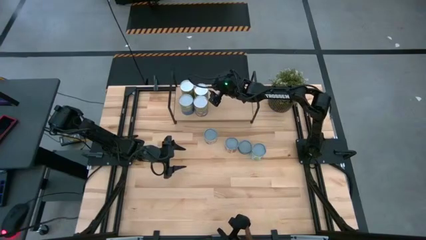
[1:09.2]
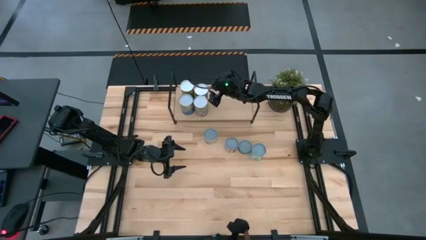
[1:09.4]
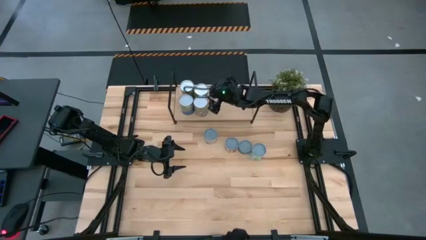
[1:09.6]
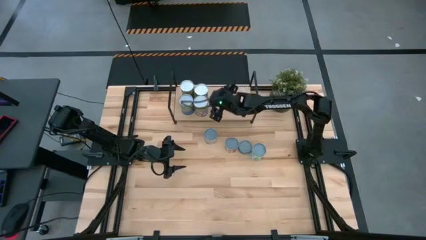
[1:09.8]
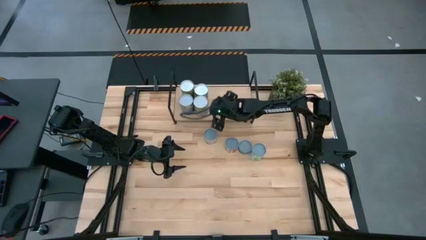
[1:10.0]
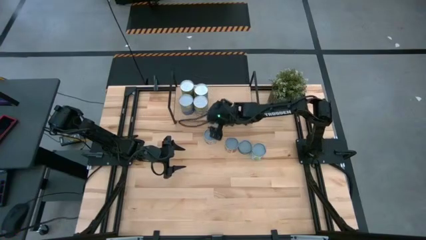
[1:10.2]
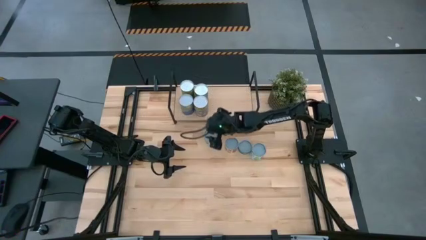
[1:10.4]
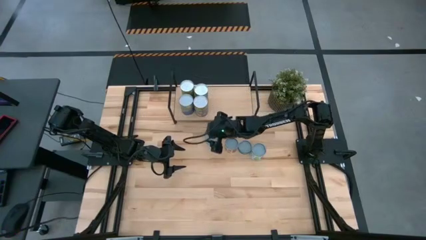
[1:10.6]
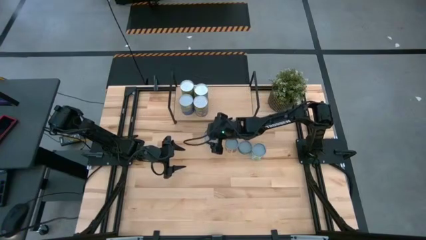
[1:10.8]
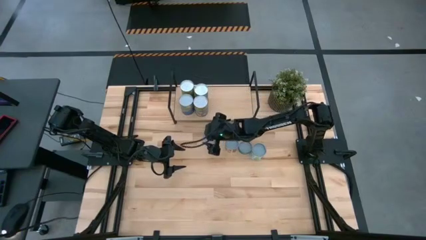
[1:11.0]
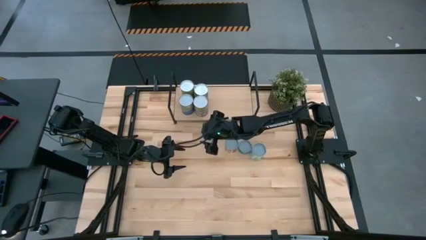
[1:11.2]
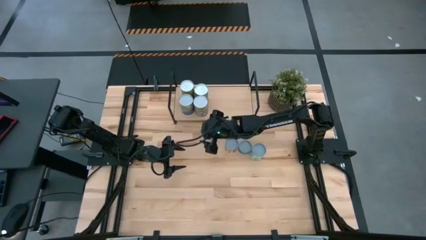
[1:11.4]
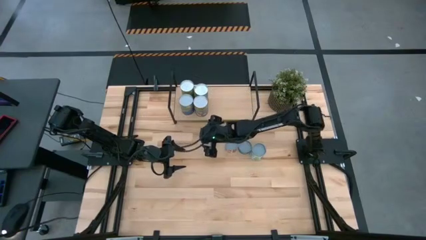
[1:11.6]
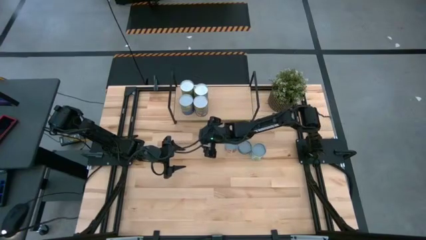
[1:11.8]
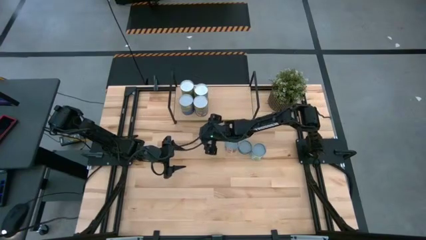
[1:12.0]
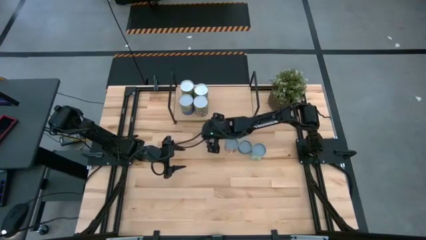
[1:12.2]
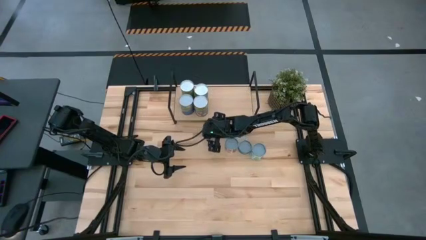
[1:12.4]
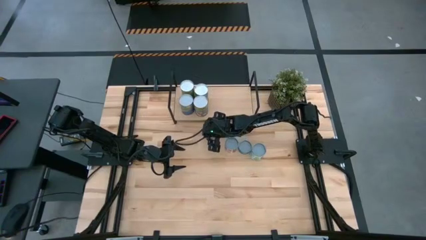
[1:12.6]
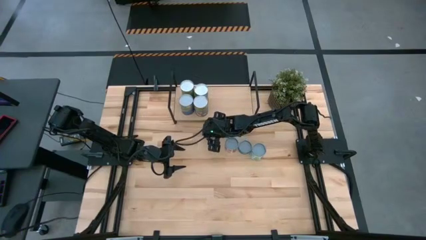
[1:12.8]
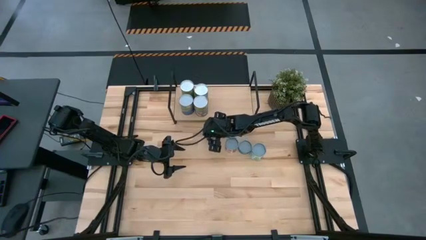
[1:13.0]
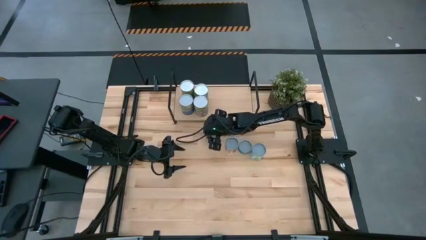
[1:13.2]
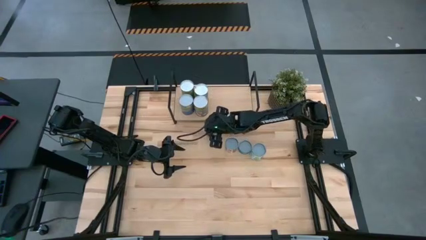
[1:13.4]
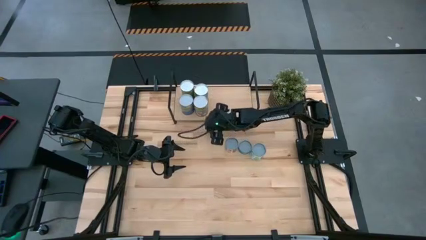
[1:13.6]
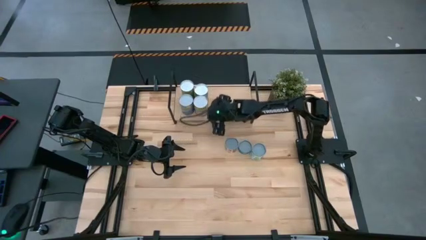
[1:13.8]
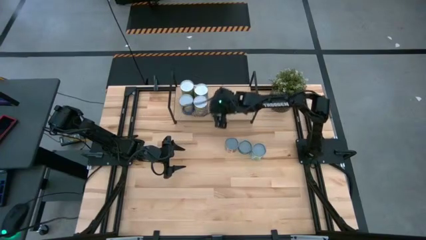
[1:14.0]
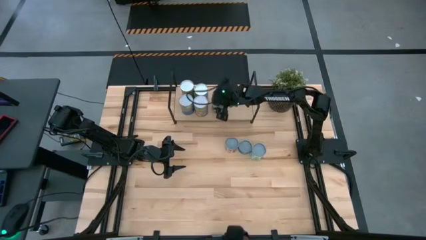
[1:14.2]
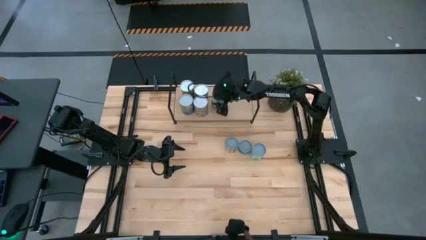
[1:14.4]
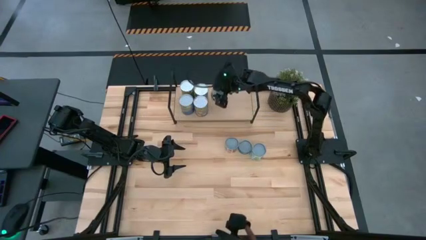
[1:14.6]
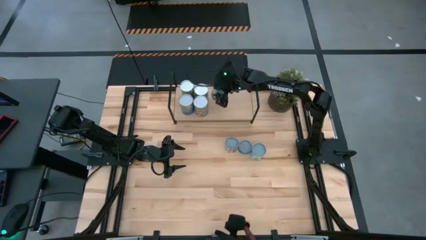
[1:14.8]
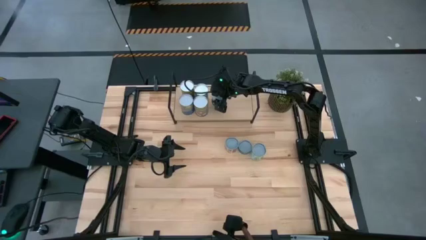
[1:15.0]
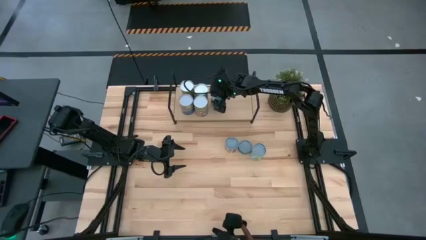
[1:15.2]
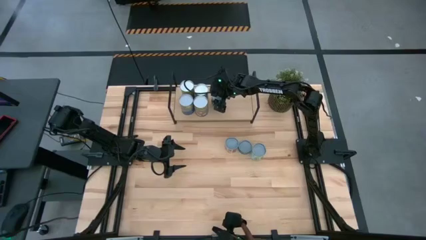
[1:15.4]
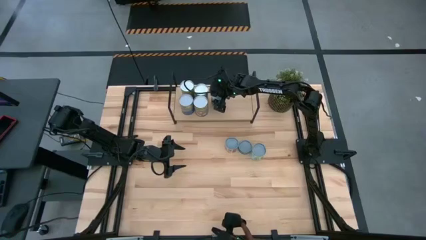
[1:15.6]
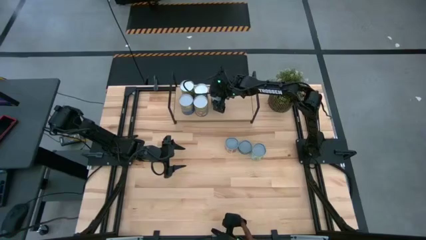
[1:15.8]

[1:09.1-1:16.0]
Task: Pick and place cans onto a shelf
Put the canned green peas on the shelf

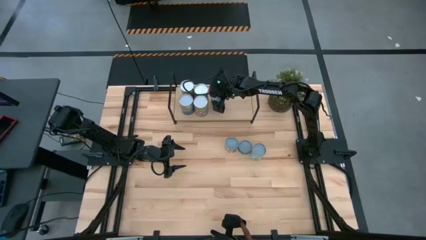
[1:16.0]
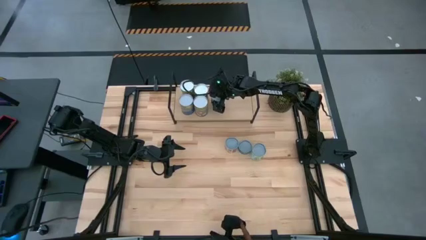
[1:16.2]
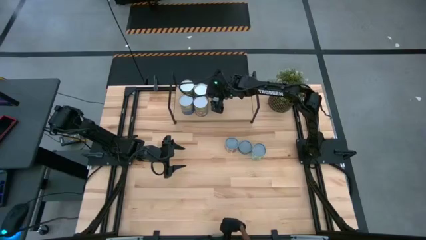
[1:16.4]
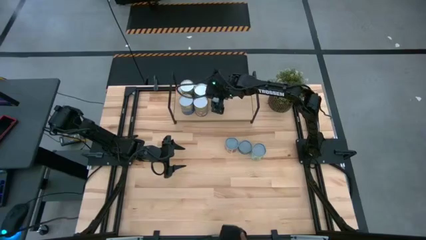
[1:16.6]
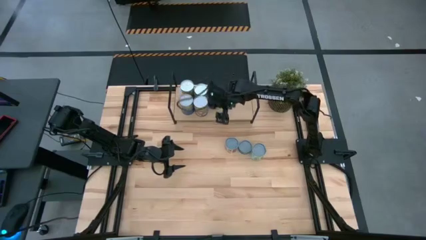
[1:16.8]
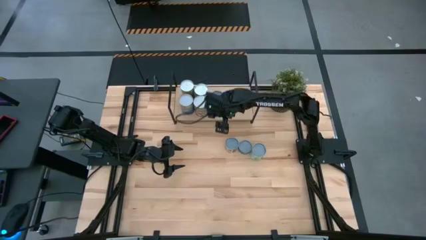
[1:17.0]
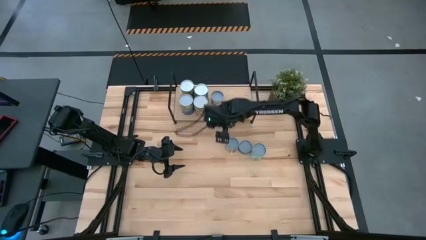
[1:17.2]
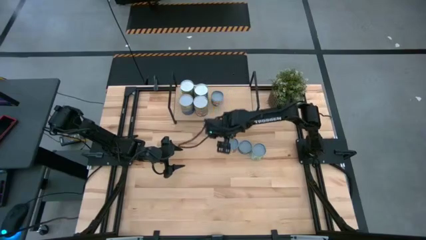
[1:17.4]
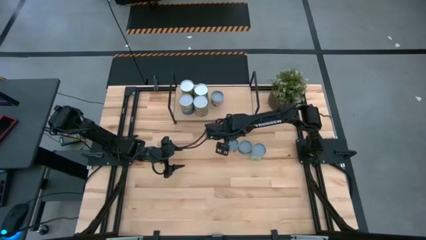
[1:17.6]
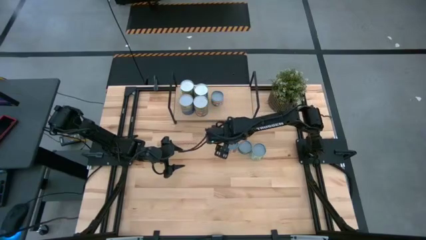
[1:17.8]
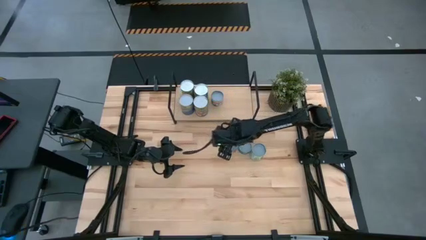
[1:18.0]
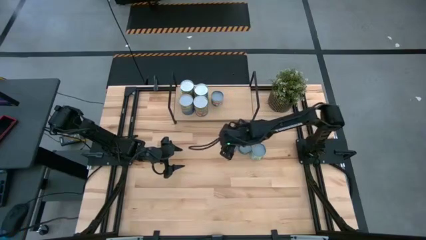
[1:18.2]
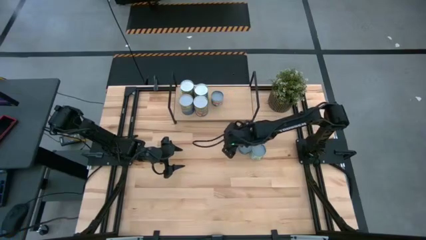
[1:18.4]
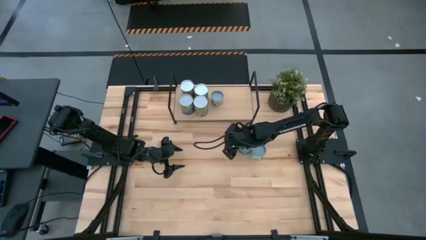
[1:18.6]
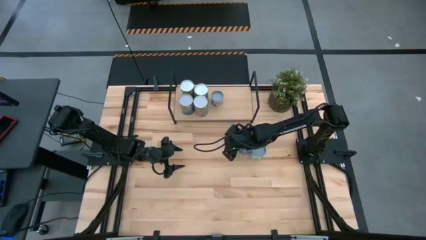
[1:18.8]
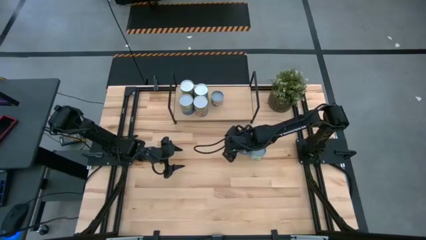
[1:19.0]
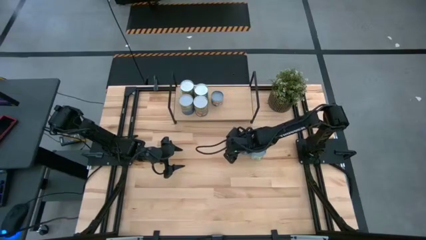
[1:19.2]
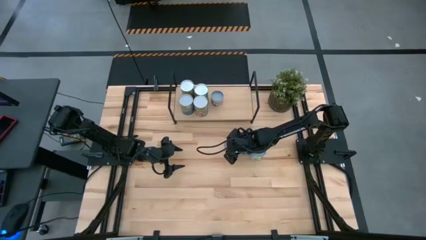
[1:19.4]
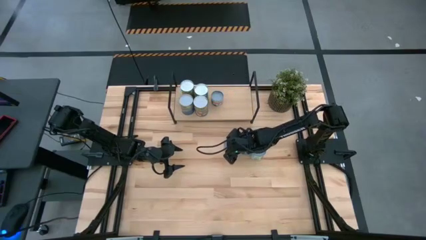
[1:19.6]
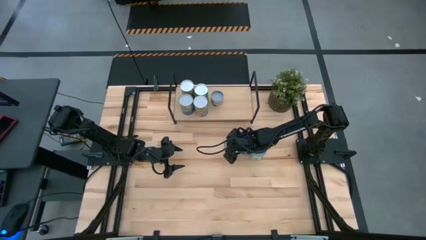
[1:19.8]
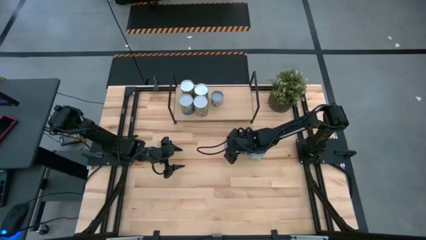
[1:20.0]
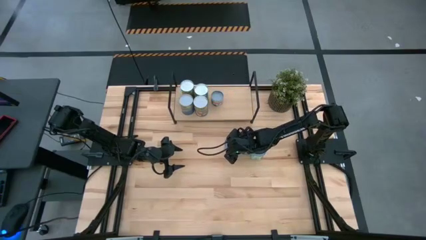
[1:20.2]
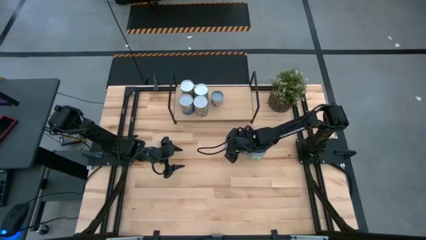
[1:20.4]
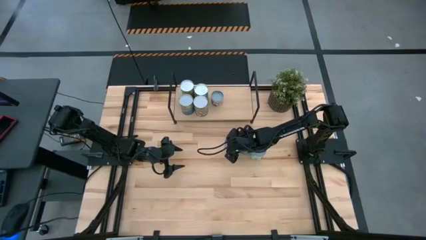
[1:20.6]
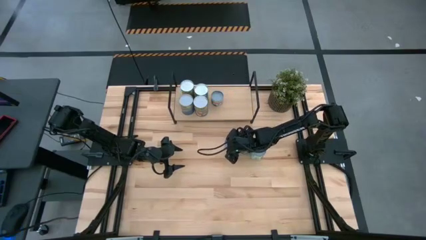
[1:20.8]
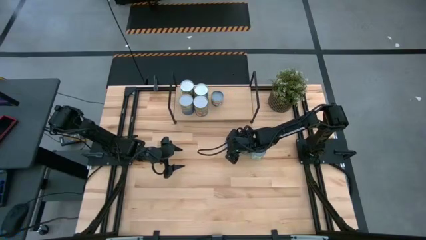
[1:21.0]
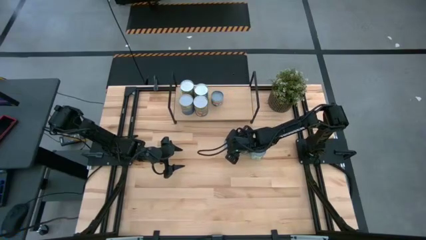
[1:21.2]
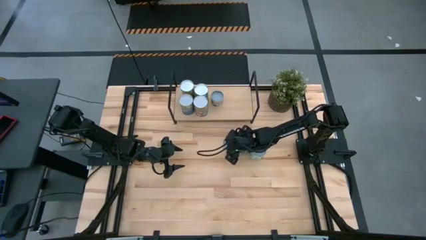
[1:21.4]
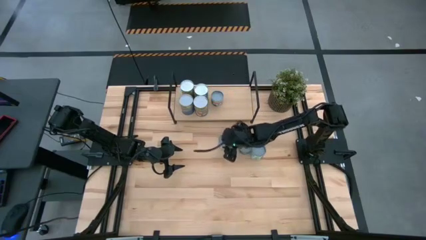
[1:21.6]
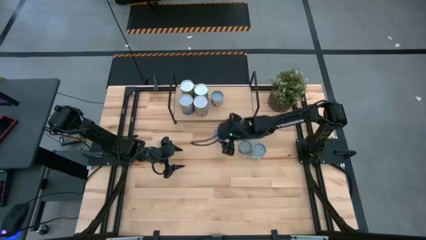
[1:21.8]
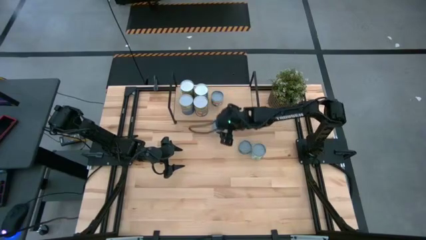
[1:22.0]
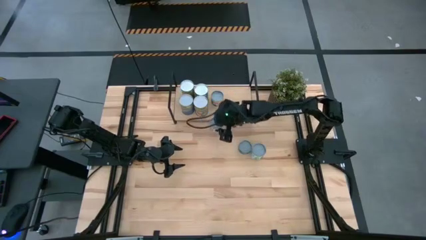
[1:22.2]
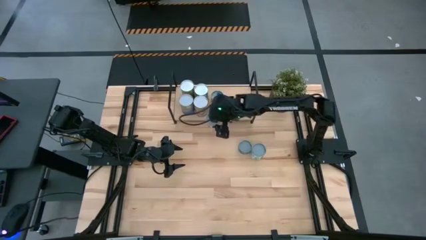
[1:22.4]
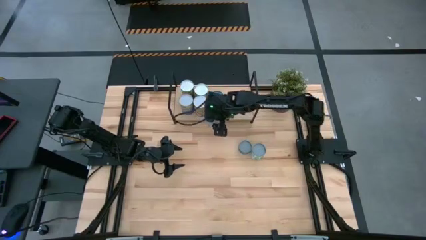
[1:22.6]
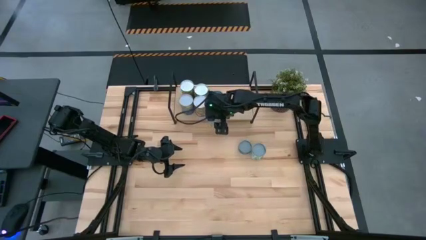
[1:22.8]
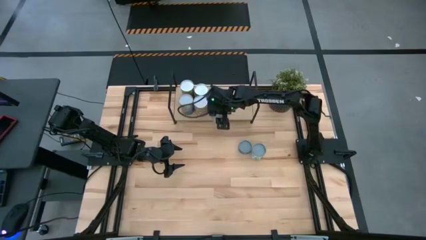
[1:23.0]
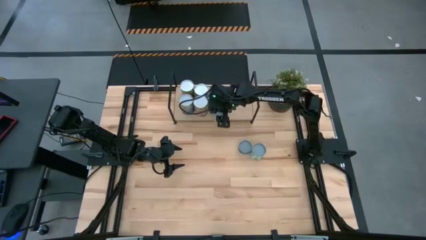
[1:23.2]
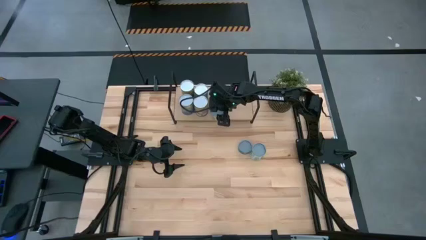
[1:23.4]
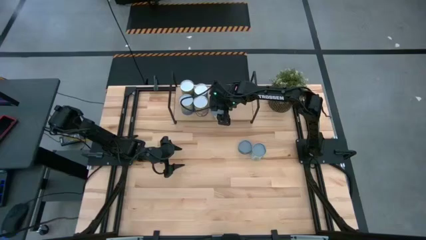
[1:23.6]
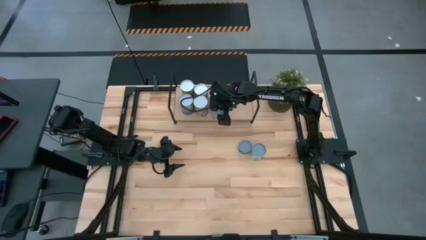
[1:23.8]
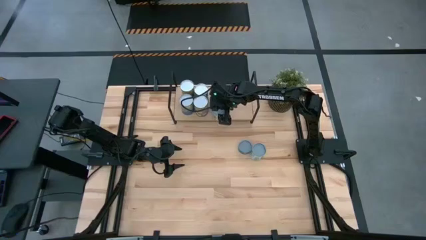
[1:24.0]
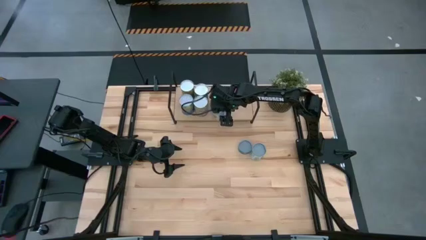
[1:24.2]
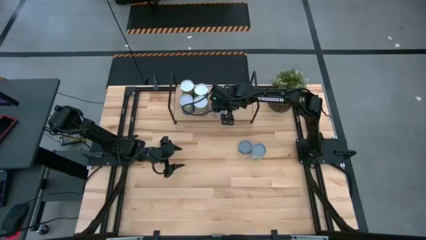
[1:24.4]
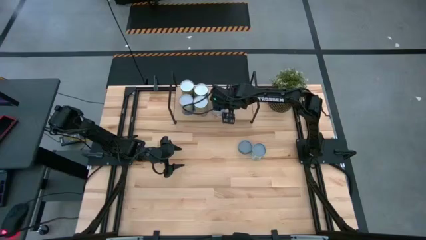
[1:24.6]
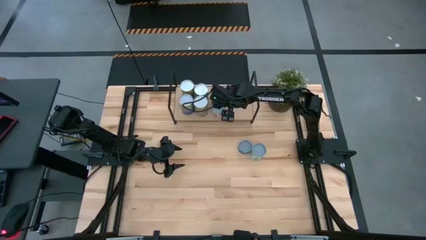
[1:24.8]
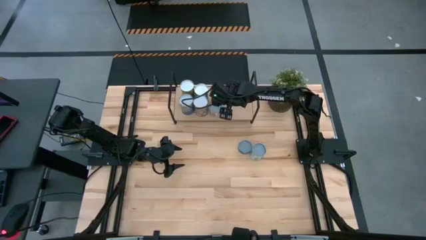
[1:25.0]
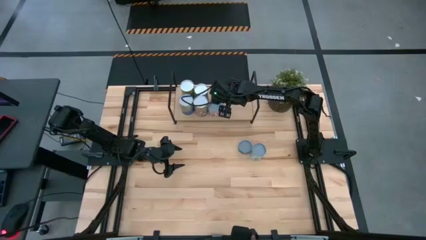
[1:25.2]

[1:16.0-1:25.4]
Put the canned diced tomatoes on the shelf
